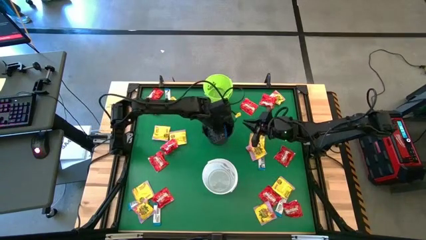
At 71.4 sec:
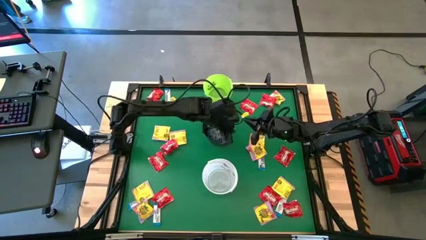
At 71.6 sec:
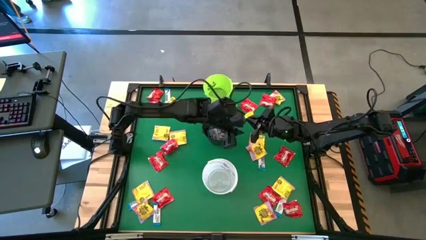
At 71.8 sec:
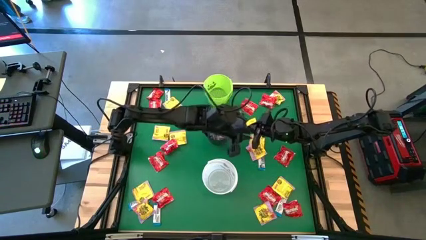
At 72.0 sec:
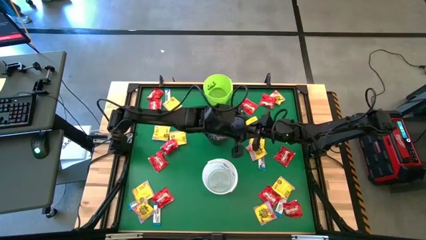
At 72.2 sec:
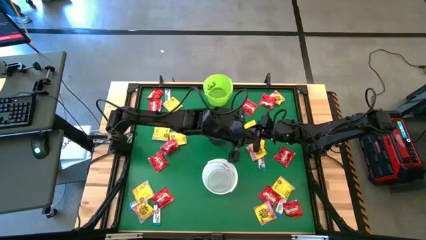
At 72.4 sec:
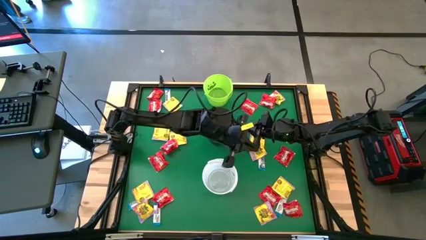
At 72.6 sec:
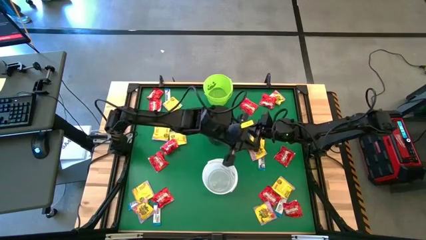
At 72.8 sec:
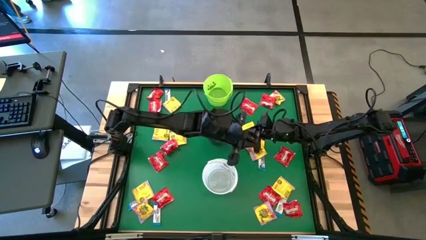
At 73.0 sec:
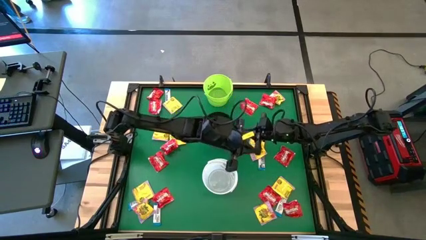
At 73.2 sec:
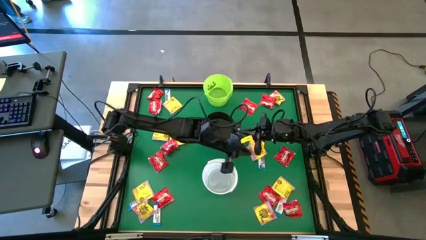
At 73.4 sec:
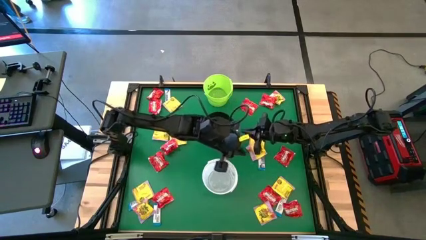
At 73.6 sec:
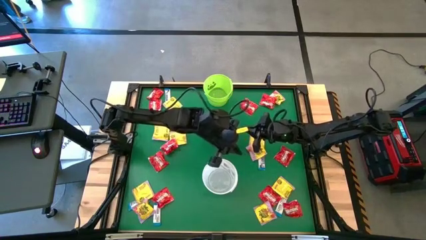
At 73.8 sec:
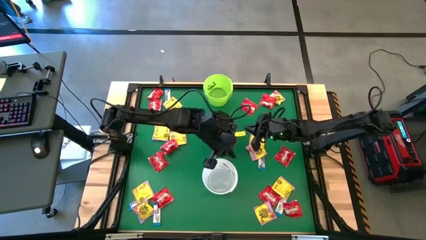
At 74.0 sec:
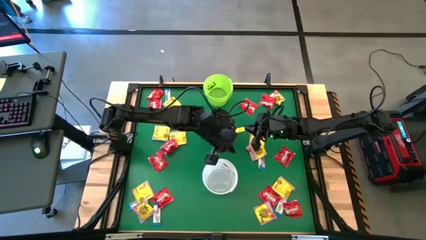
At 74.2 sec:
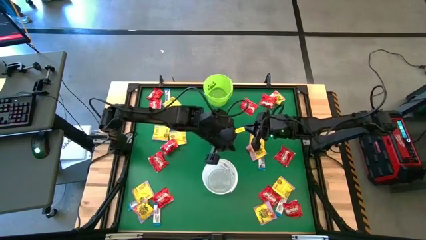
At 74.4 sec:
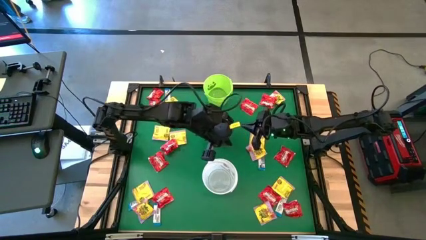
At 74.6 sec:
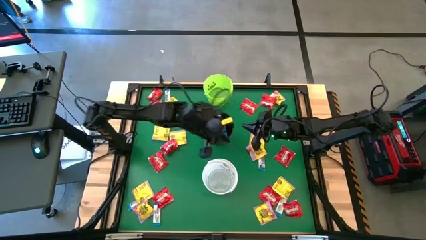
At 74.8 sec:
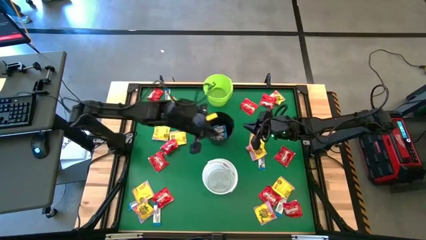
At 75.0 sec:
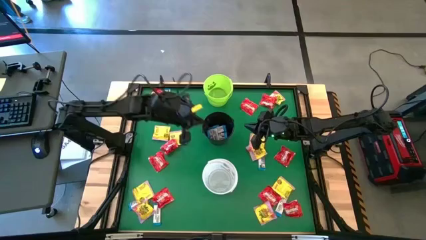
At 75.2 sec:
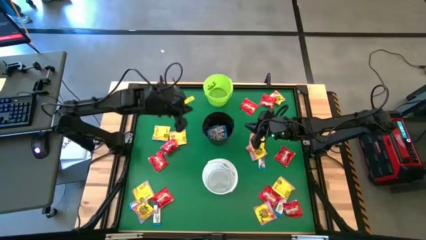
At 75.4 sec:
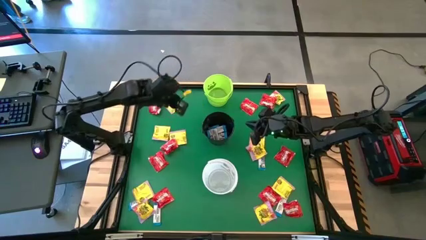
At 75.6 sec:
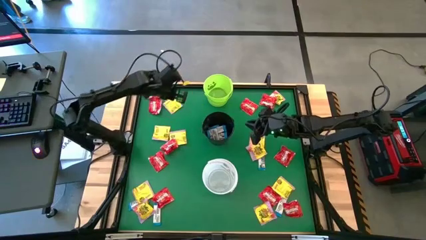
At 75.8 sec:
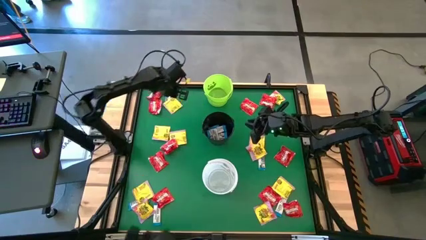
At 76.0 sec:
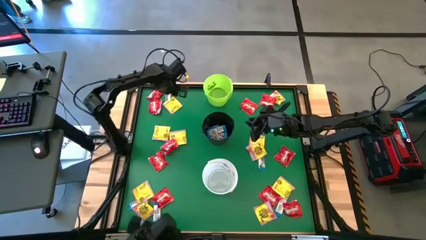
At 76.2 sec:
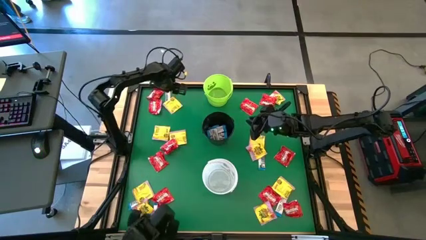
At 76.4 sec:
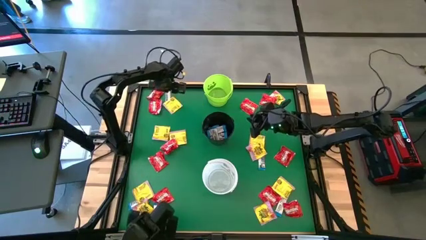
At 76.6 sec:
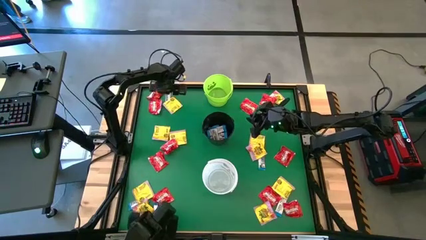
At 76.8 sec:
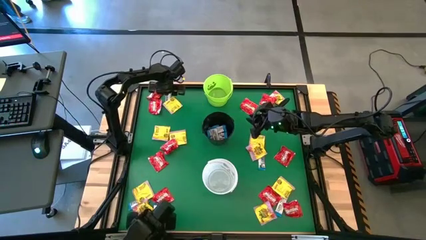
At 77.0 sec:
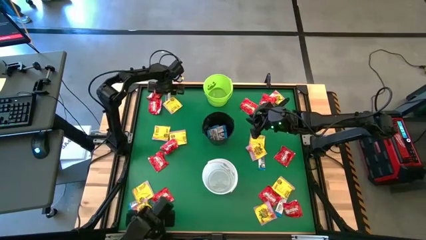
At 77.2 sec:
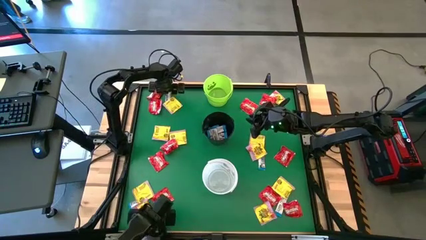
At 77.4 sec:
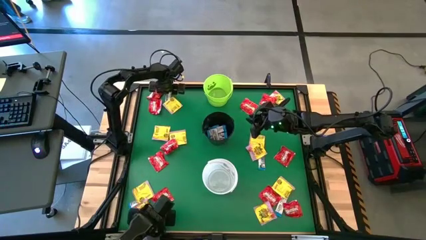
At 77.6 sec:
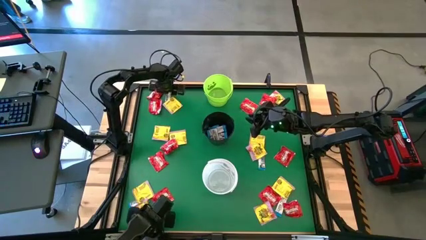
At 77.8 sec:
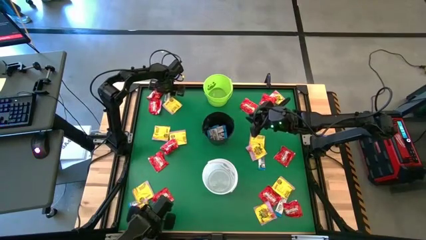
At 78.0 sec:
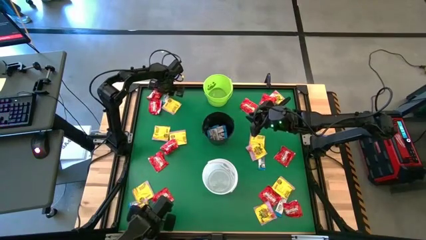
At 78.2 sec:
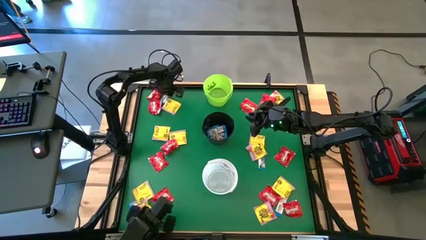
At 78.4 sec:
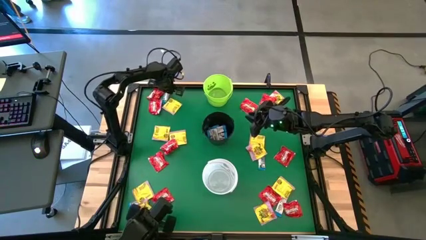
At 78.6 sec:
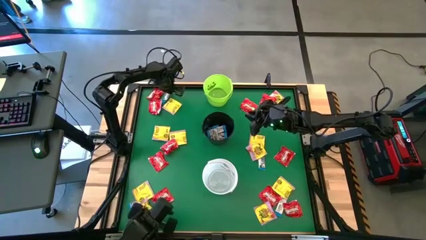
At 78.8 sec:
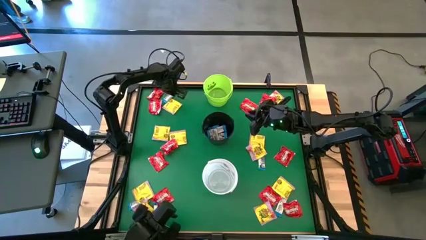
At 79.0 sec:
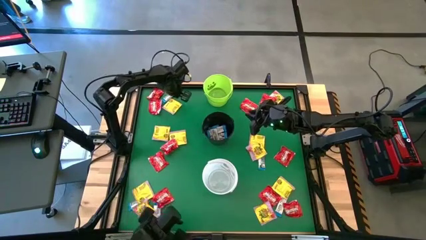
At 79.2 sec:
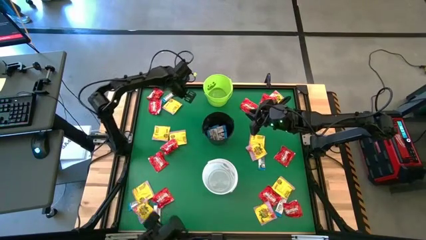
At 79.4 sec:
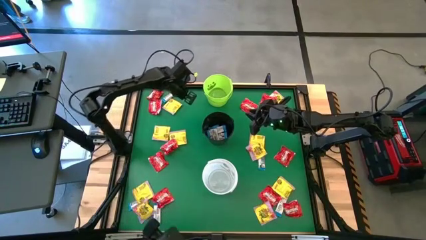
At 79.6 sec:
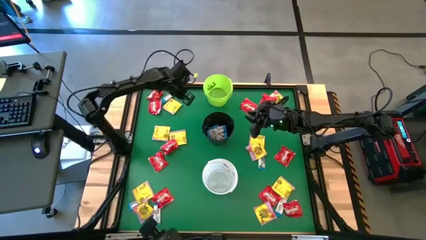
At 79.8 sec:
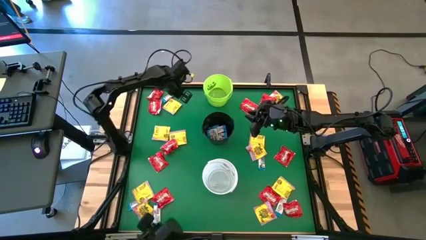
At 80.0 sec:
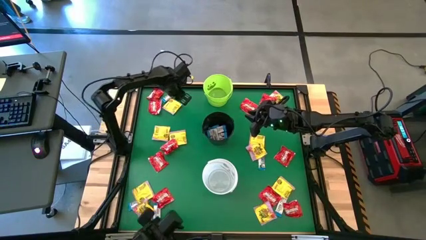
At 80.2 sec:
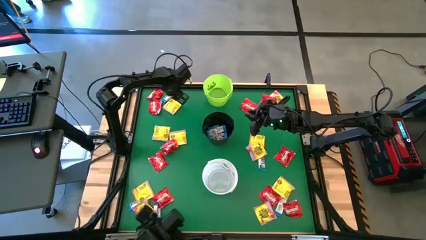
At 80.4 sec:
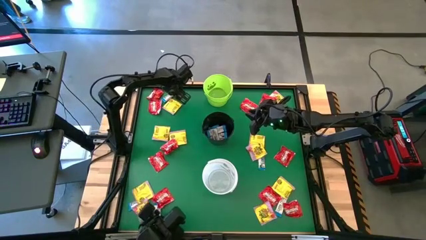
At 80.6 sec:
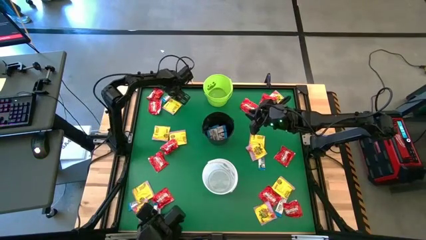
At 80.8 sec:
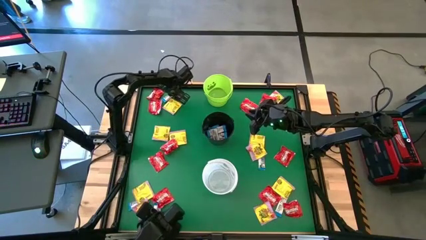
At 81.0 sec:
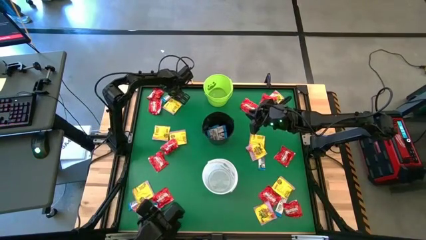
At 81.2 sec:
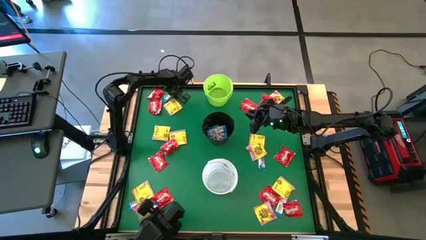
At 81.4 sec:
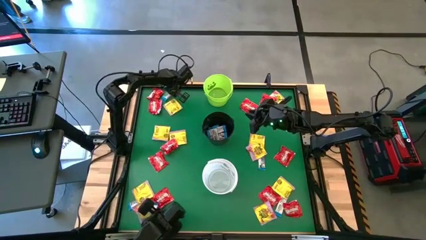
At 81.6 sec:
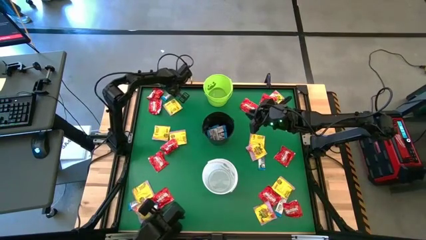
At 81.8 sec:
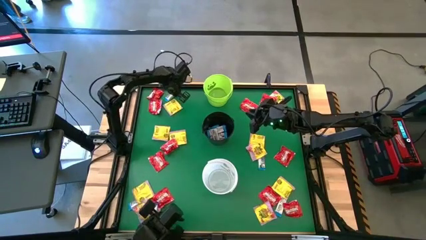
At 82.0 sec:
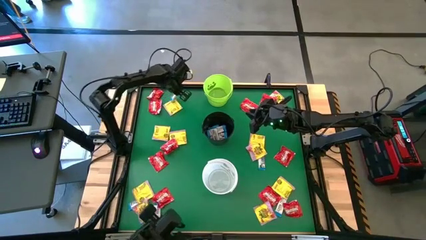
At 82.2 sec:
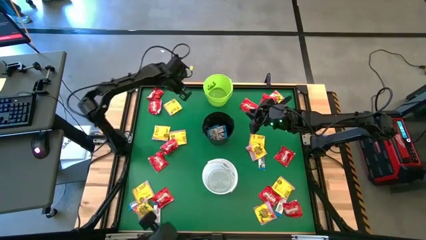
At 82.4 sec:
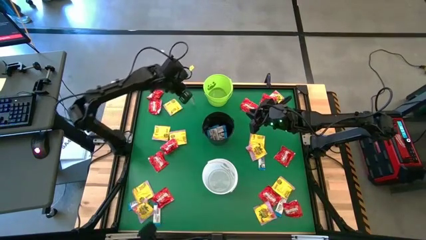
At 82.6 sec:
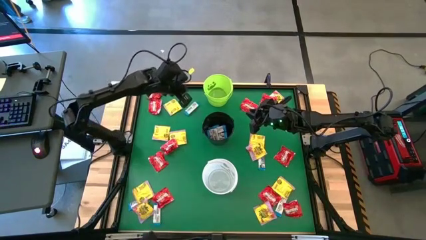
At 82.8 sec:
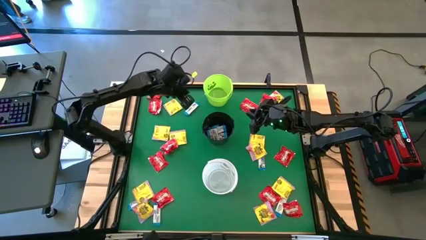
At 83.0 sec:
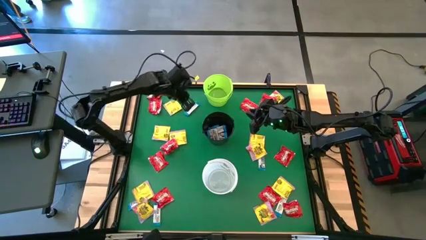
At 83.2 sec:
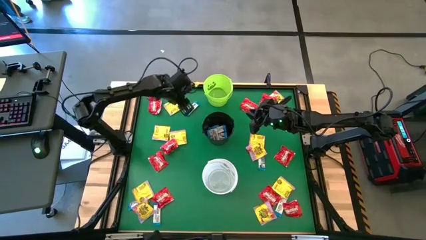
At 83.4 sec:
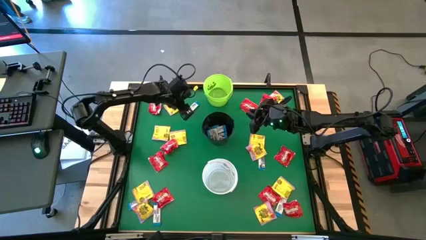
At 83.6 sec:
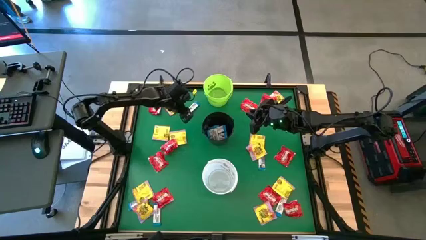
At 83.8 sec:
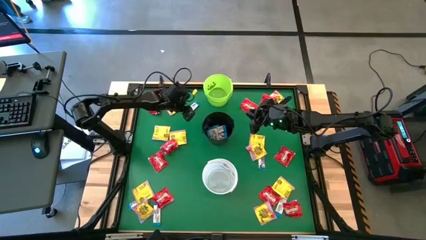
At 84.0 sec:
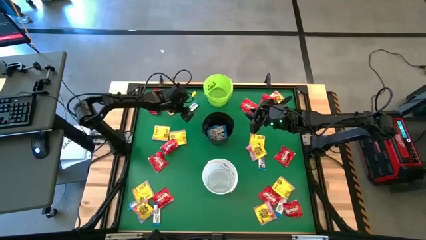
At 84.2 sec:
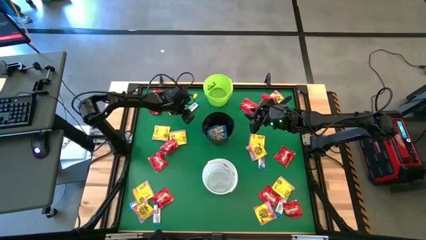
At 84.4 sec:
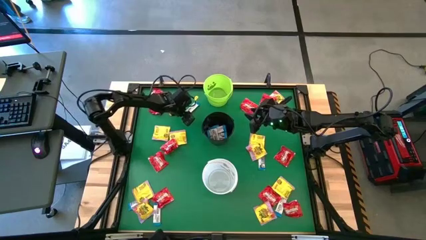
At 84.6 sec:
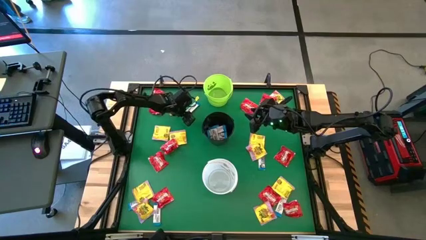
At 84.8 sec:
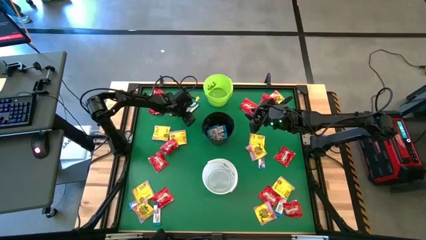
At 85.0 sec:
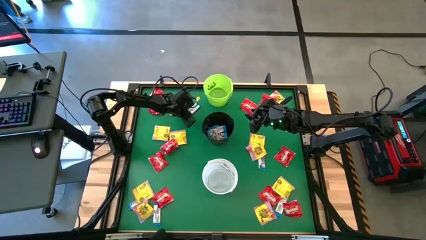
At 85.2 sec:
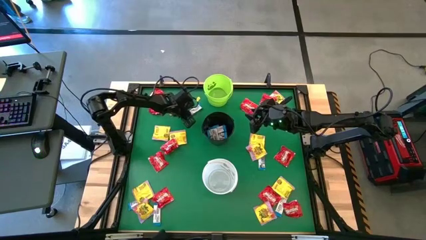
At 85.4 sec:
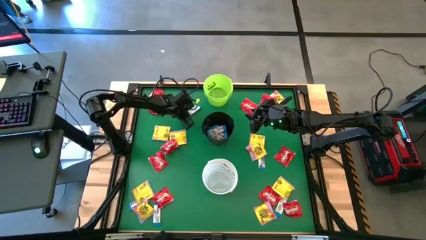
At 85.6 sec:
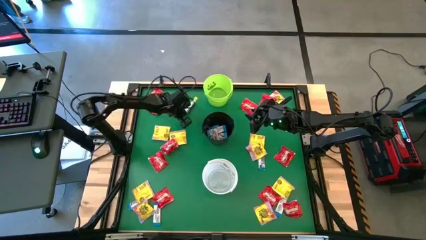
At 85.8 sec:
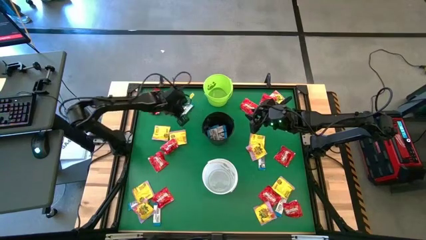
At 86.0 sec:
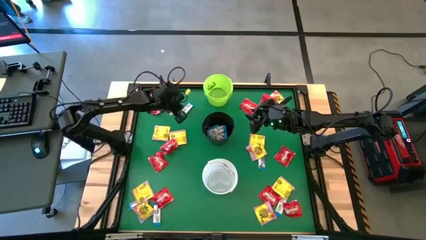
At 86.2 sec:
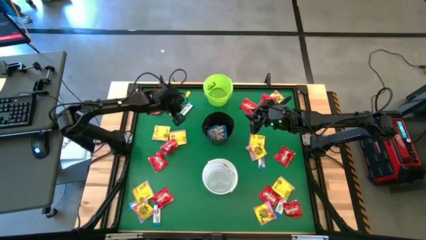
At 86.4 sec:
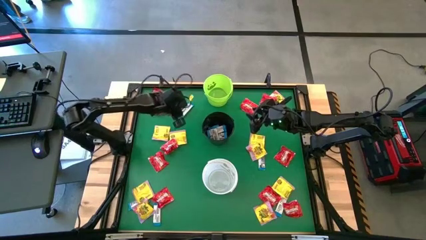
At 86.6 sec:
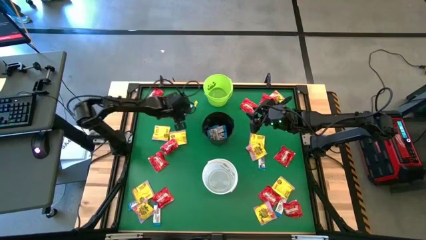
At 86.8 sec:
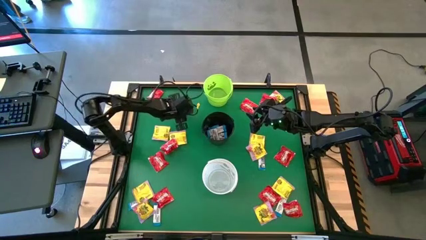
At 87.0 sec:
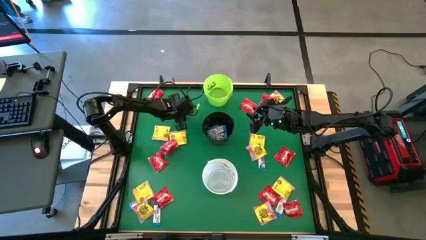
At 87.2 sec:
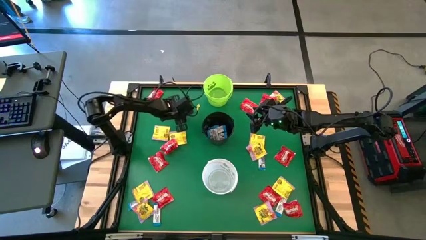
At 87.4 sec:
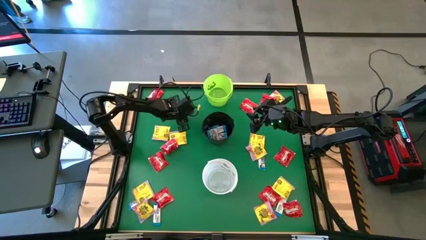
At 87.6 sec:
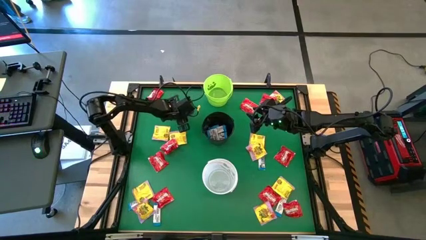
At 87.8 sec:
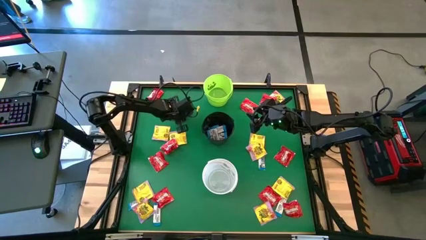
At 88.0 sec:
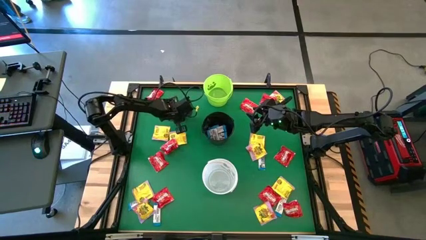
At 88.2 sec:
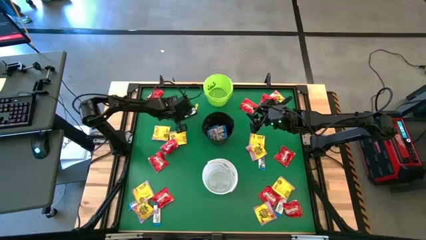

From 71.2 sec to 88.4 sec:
Task: Sort candy by brand, put in halloween buckets
Put the white chocolate into the black bucket
